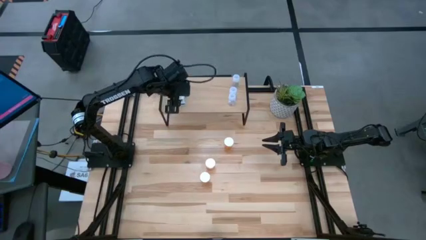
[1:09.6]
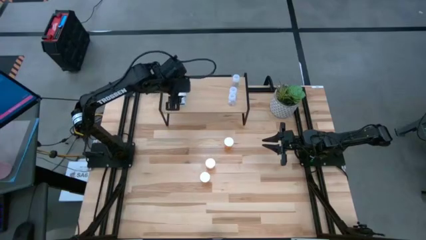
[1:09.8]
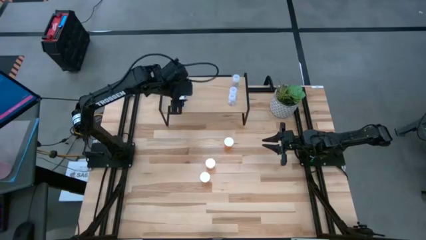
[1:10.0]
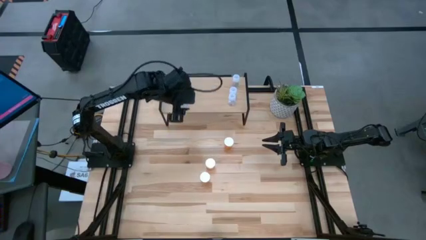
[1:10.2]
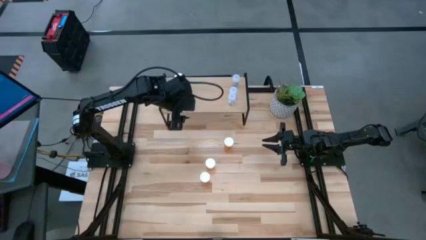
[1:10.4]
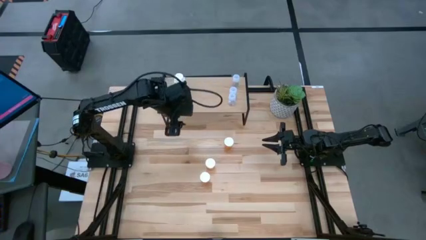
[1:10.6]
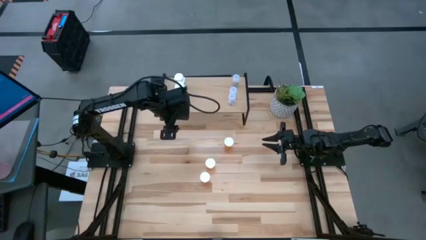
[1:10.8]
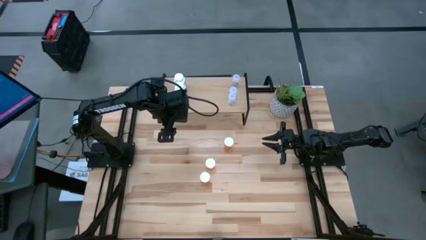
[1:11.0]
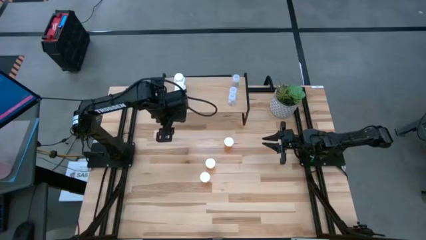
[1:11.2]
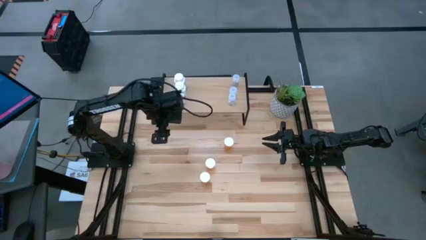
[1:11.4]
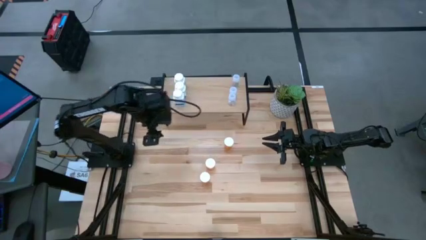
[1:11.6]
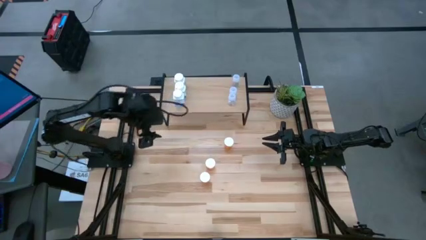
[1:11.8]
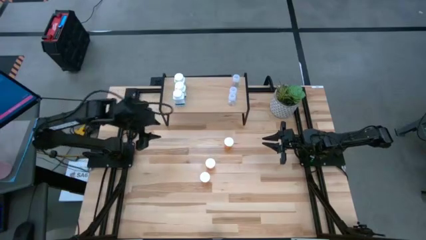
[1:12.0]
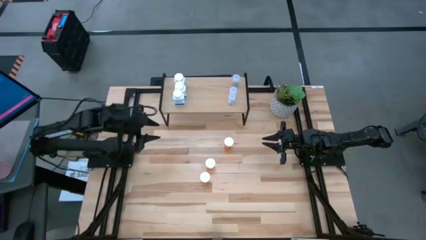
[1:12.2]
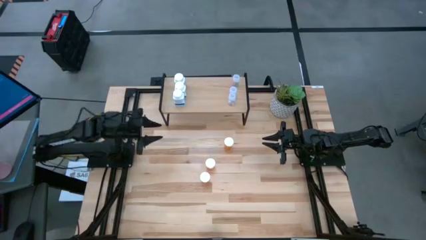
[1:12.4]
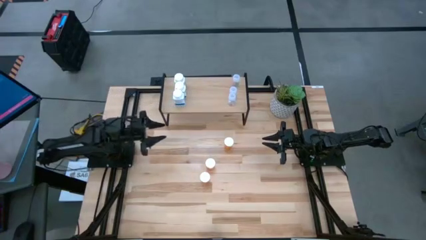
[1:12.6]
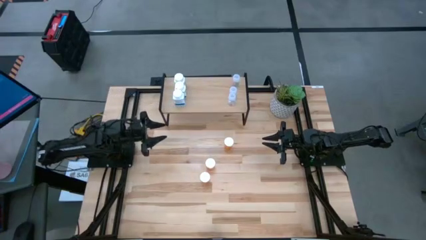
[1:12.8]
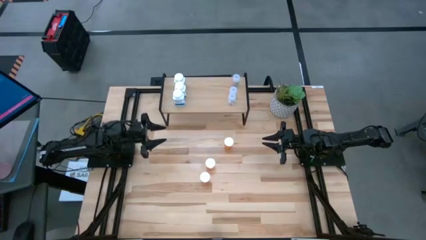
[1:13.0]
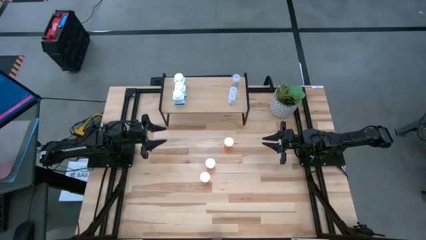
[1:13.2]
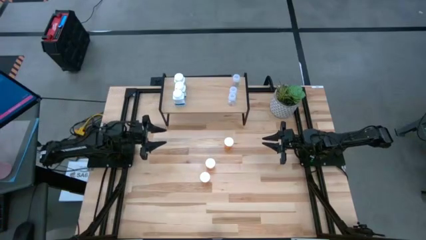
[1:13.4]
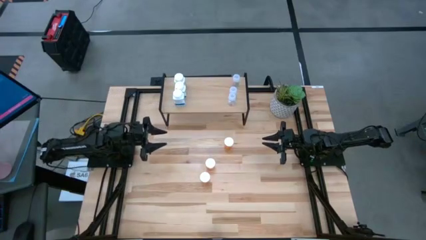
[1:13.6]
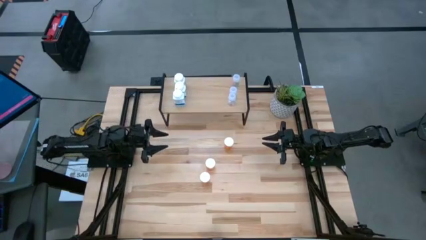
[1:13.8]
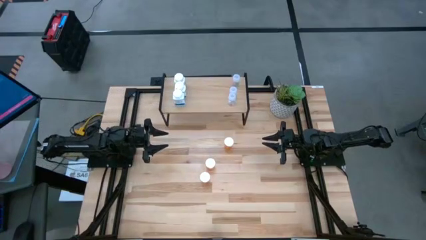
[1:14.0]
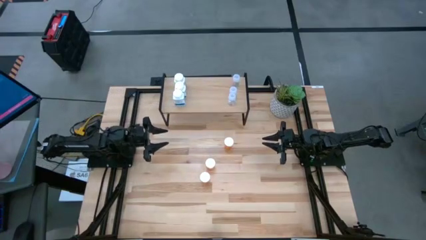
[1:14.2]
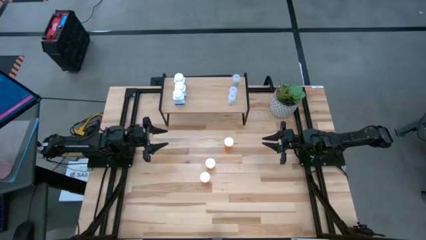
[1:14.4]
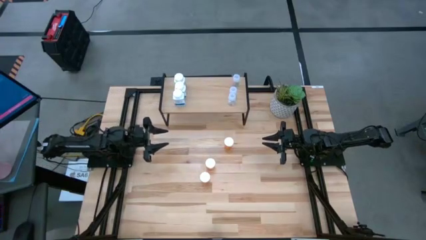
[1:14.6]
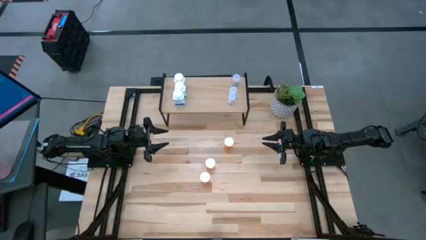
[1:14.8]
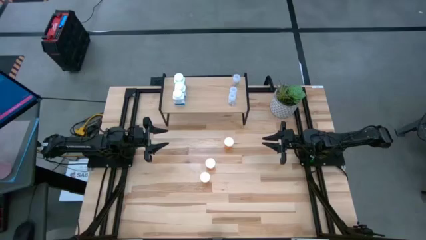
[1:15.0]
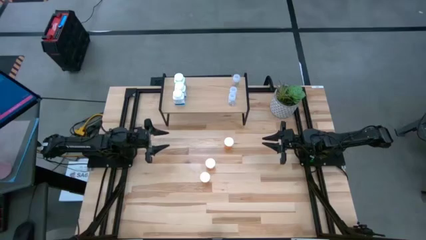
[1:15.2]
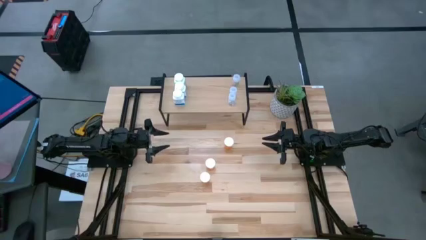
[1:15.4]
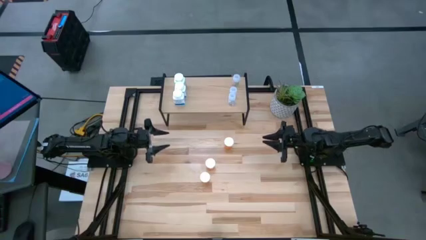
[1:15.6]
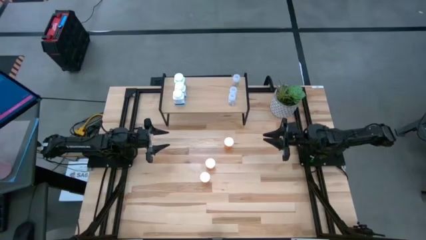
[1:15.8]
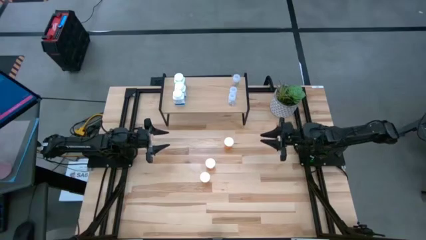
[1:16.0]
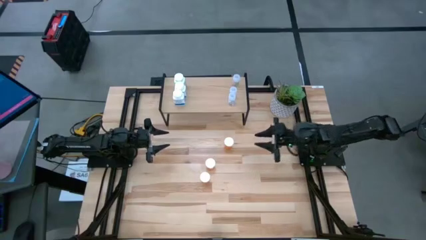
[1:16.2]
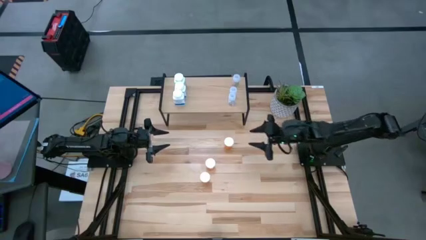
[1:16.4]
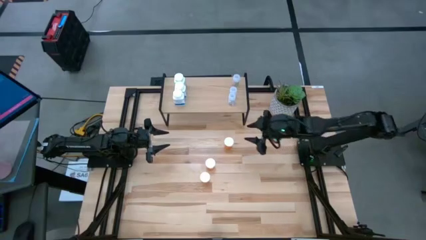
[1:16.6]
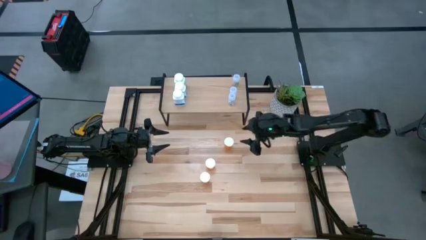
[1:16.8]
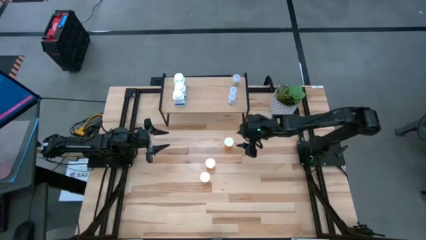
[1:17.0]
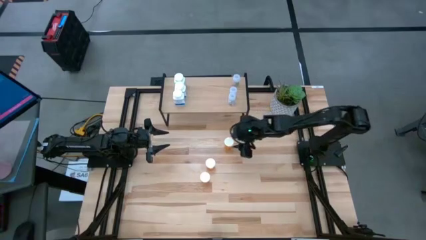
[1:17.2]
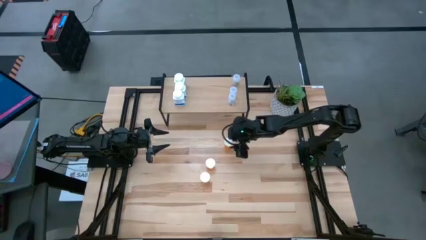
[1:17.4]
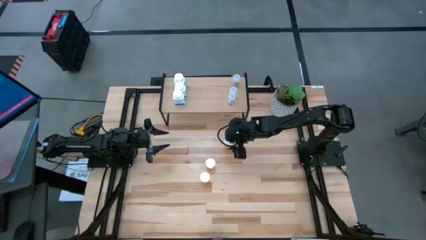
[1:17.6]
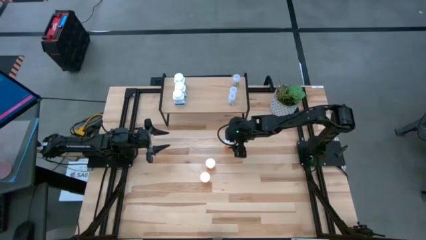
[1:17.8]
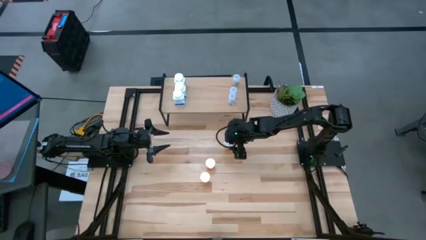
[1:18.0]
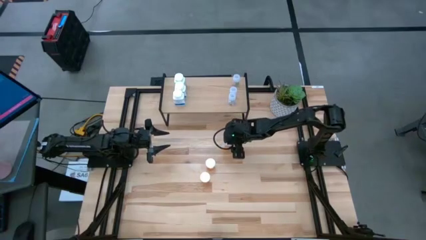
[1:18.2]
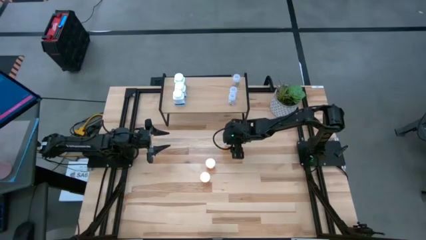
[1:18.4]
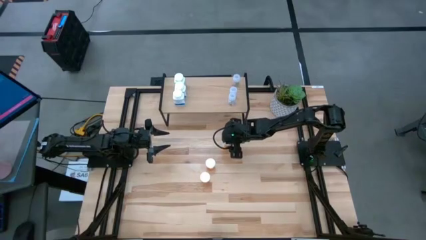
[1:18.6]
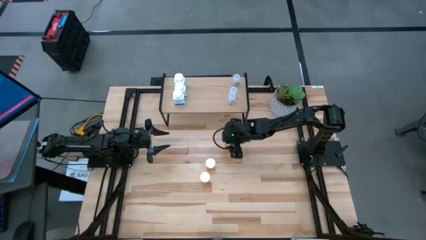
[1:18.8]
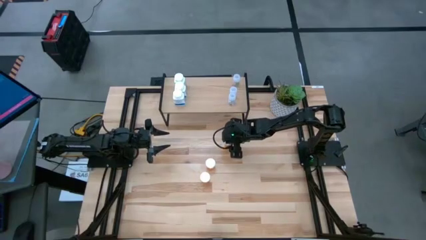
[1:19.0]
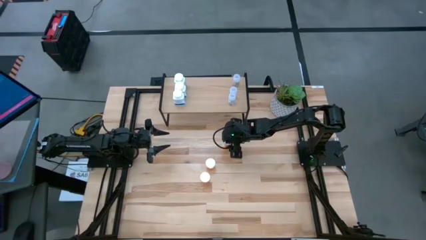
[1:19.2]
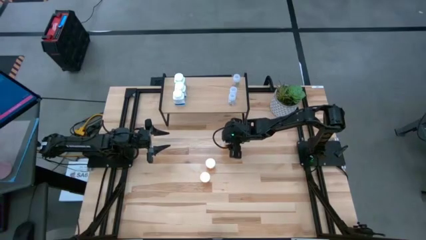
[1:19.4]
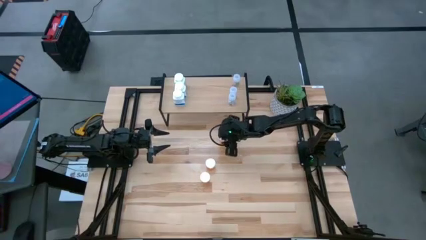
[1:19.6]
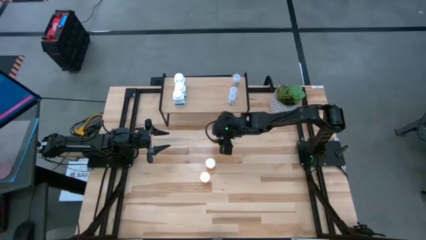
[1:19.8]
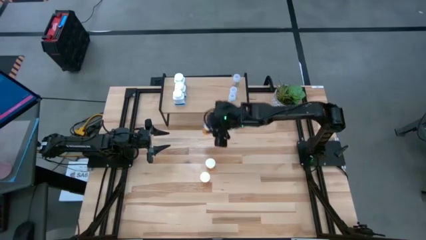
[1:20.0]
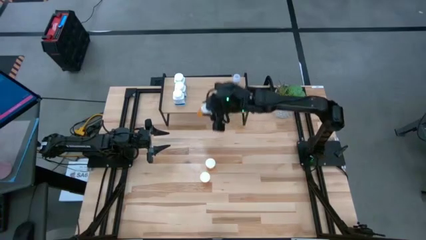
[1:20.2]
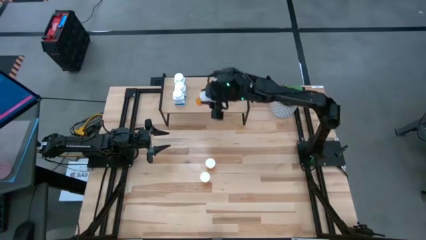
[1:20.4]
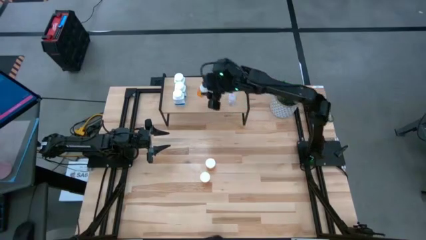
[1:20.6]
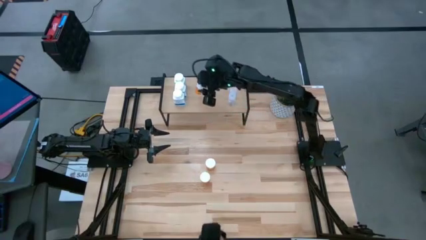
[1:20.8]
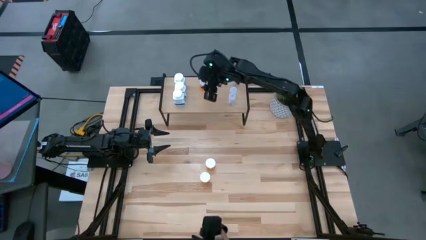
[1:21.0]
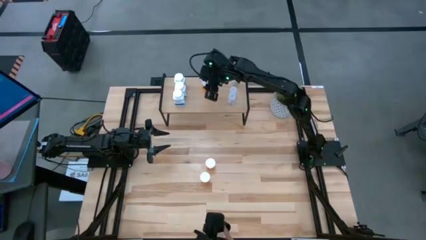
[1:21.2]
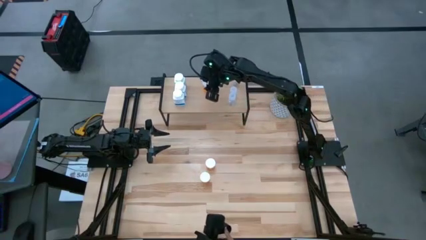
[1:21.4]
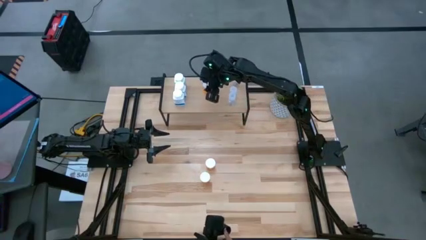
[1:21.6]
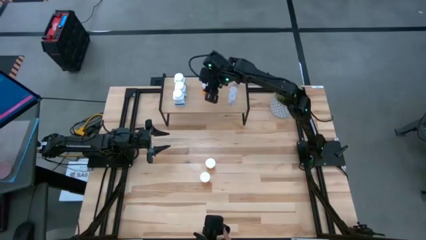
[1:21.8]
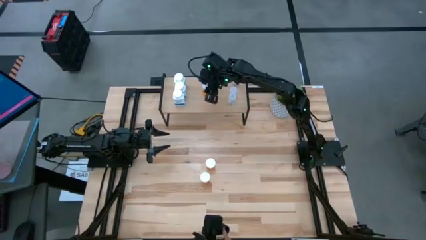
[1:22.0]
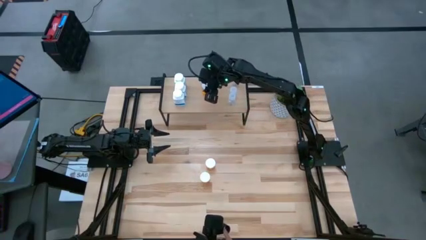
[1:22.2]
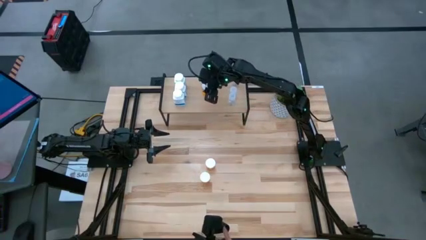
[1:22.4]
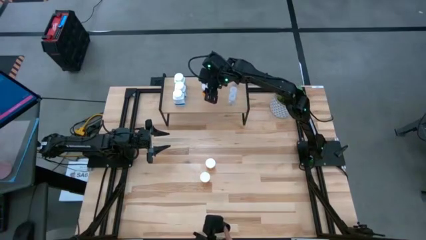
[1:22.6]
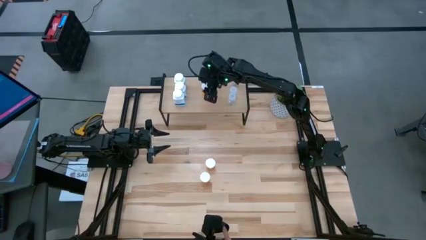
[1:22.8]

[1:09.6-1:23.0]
Task: Pick and place medicine bottles onto shelf by color
Put the top orange pill bottle on the shelf

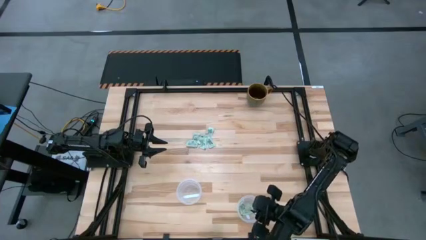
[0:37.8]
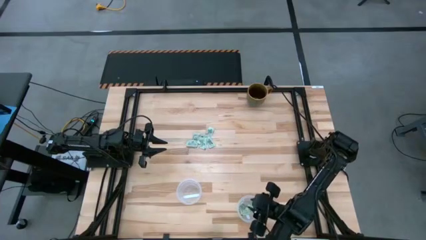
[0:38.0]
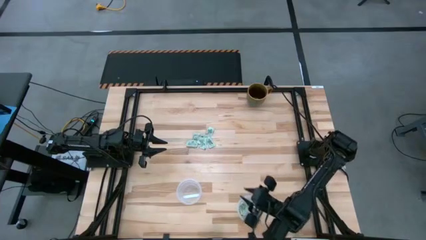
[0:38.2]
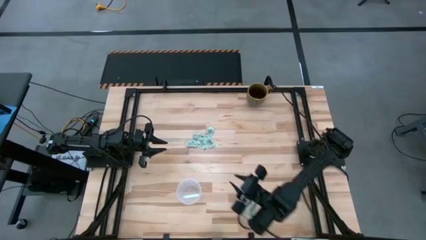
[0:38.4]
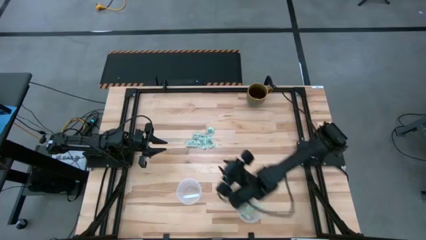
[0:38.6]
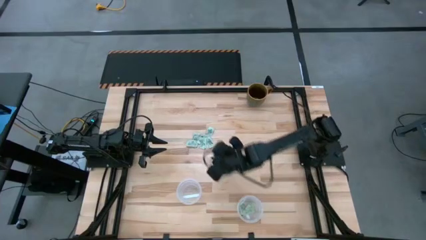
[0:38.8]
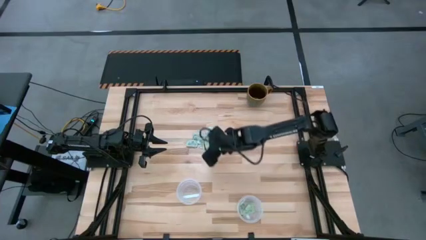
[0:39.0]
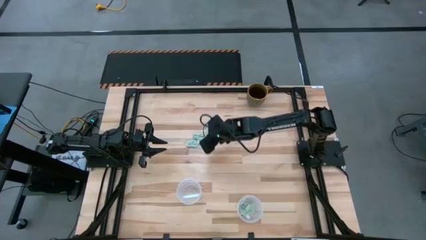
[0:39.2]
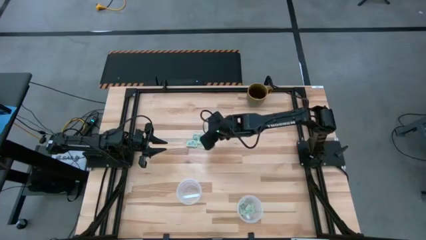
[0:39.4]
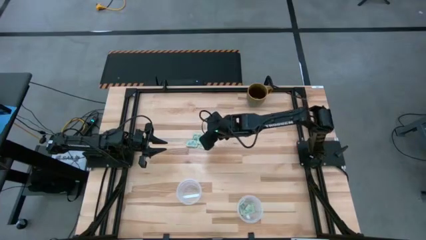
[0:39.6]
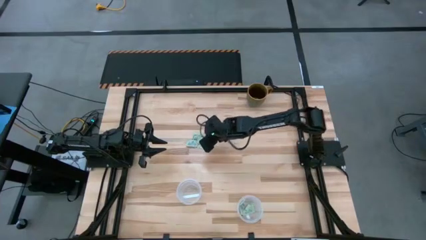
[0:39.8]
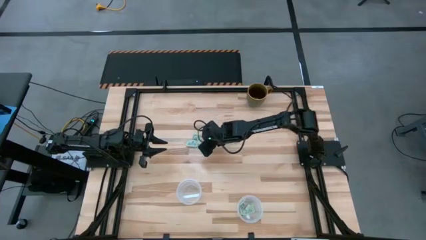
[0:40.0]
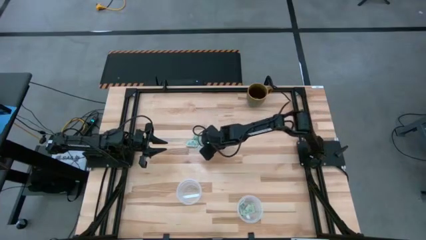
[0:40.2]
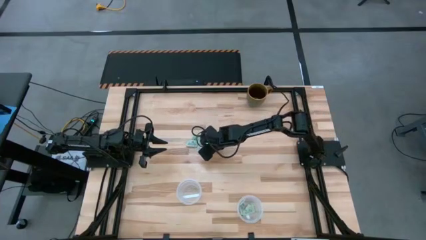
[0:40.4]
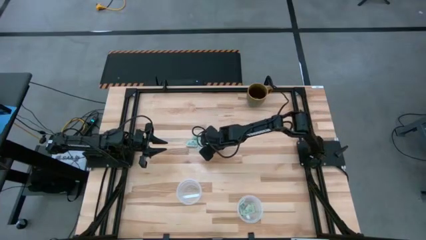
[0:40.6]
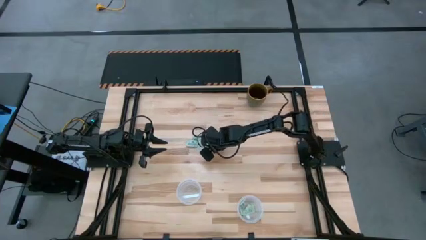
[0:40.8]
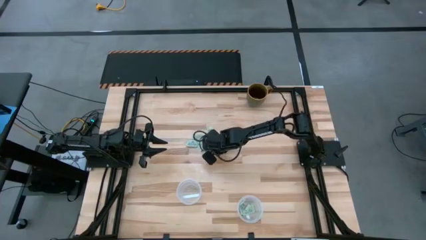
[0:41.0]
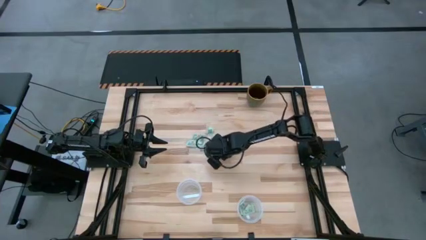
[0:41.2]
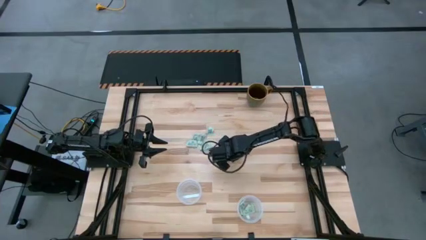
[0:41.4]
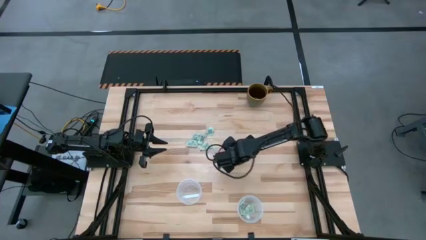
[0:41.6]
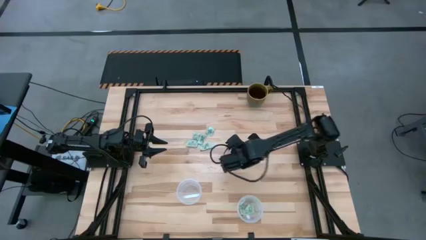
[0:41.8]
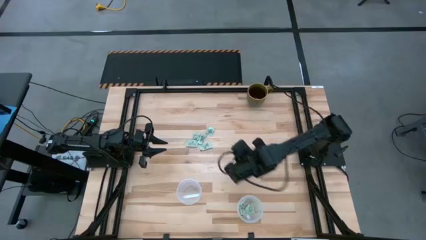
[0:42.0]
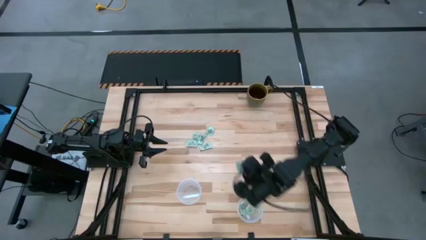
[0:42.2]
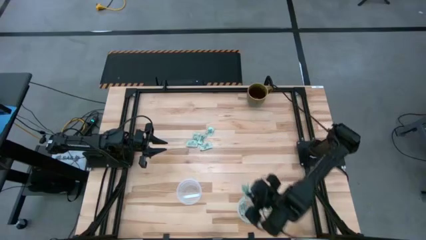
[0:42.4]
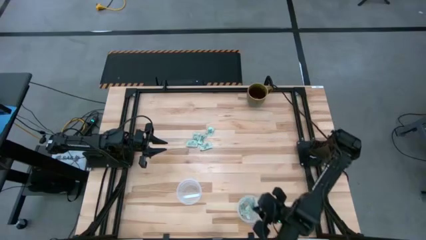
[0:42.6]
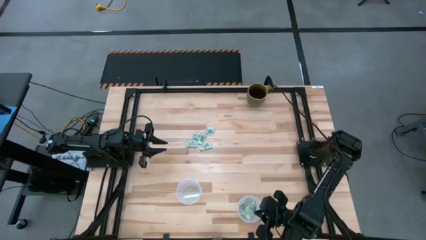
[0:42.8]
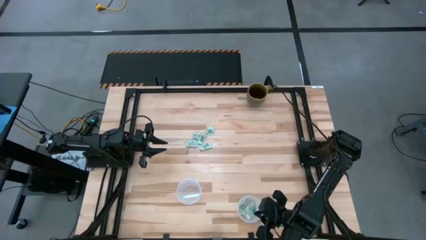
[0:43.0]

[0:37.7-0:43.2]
Task: Pick and place items into bin
Put the stevia packet into the right transparent bin
